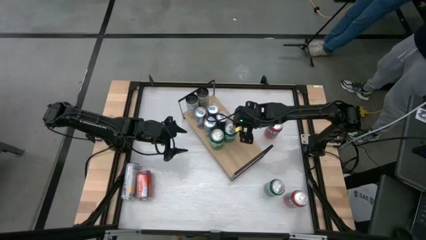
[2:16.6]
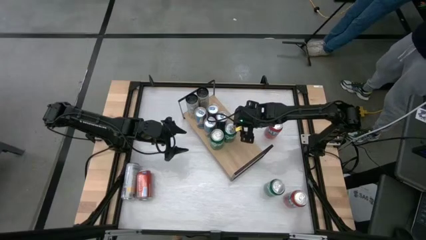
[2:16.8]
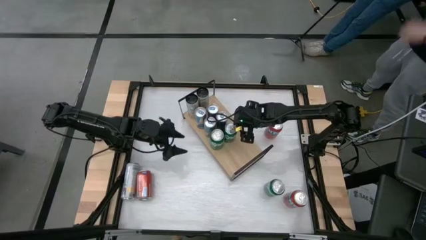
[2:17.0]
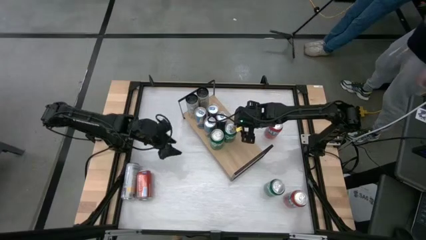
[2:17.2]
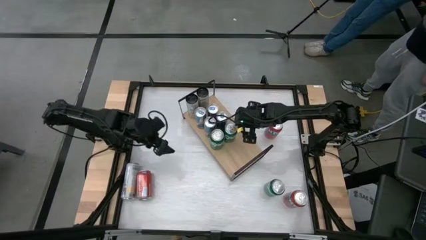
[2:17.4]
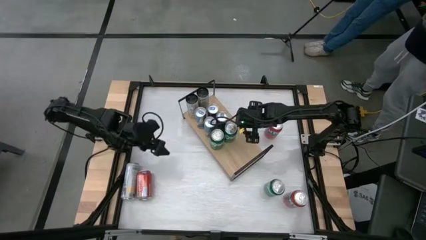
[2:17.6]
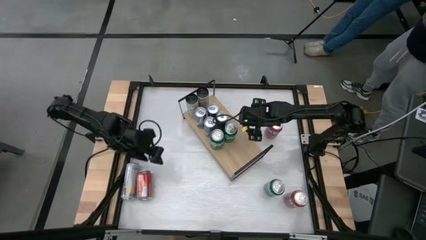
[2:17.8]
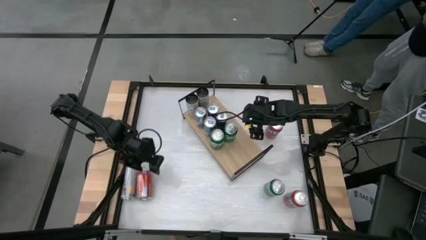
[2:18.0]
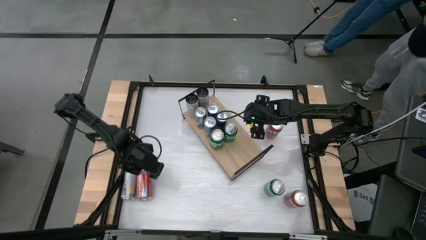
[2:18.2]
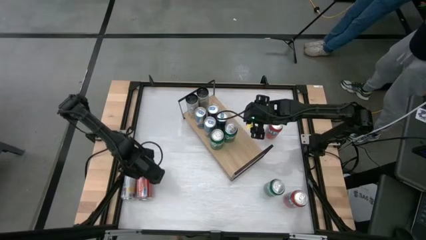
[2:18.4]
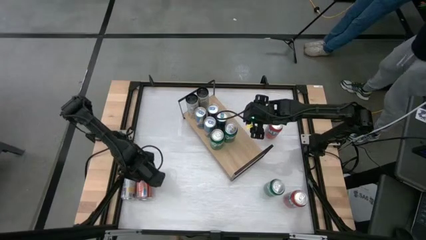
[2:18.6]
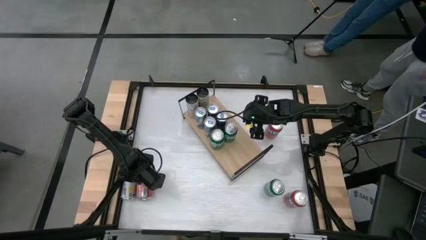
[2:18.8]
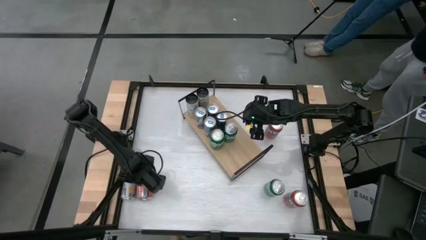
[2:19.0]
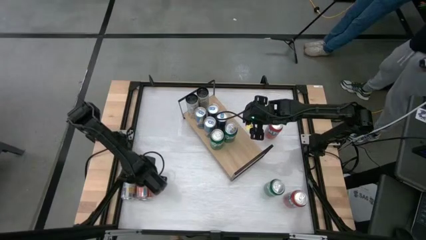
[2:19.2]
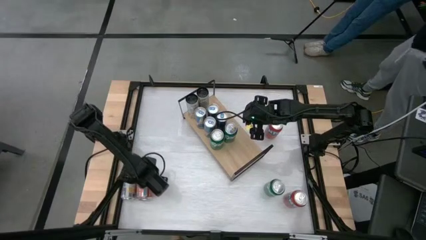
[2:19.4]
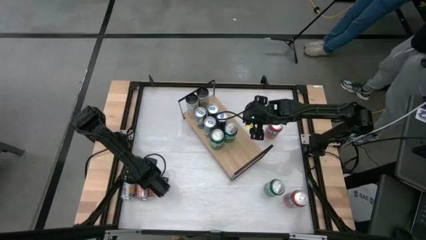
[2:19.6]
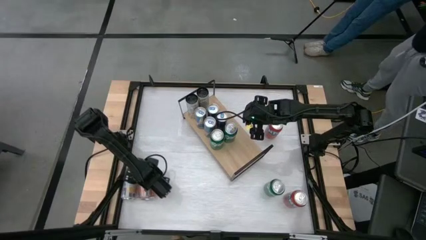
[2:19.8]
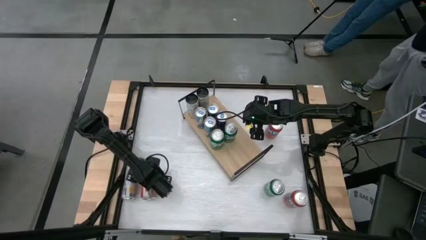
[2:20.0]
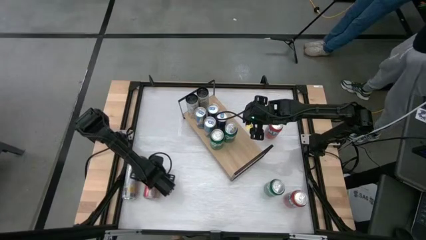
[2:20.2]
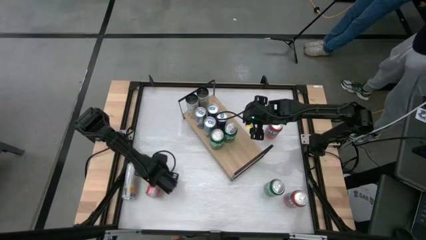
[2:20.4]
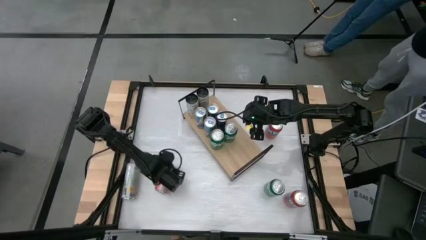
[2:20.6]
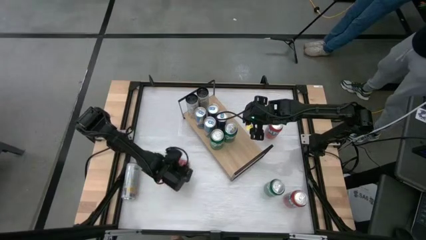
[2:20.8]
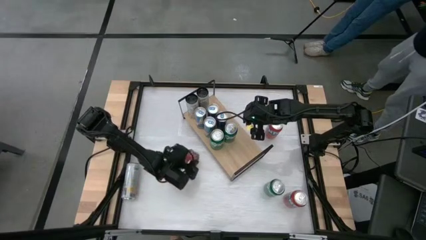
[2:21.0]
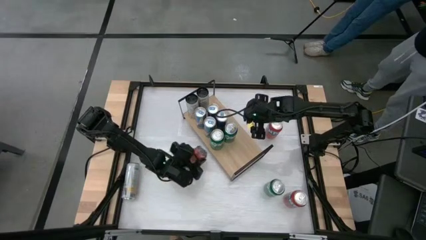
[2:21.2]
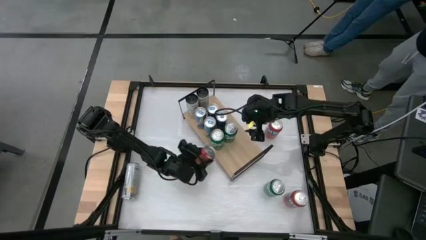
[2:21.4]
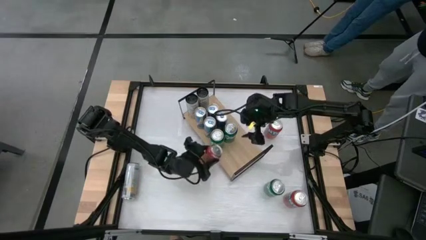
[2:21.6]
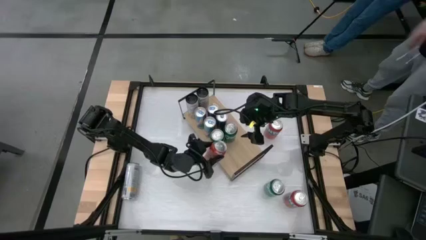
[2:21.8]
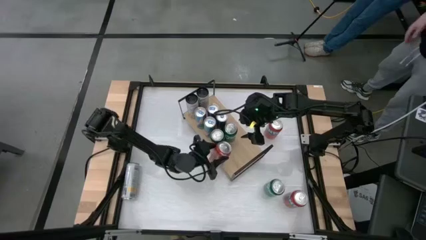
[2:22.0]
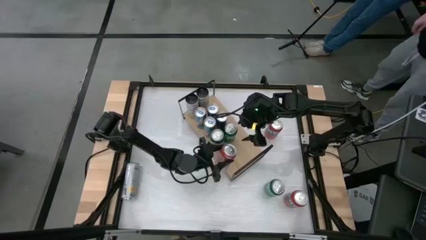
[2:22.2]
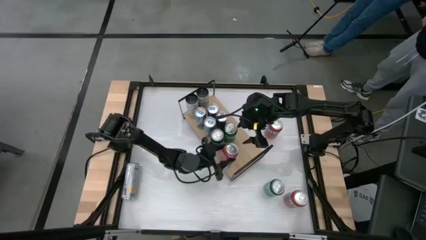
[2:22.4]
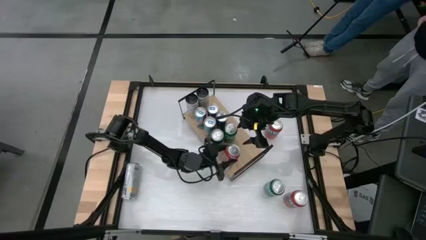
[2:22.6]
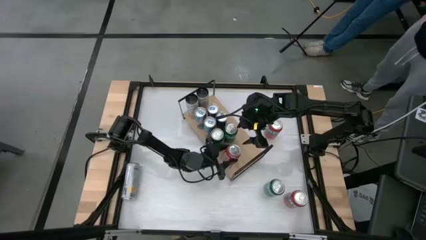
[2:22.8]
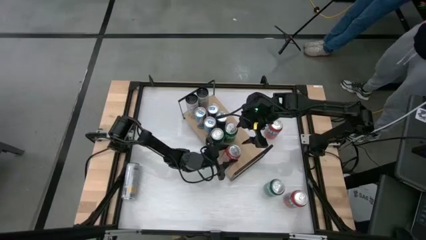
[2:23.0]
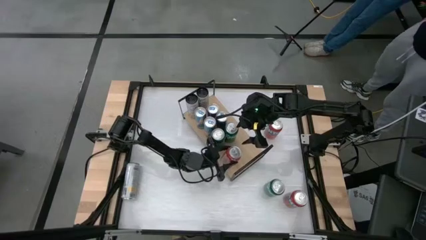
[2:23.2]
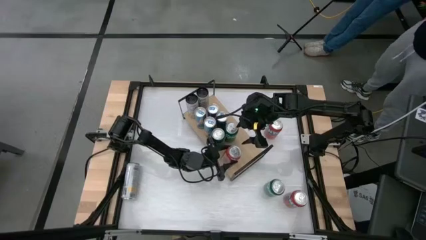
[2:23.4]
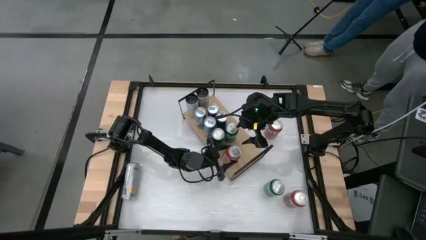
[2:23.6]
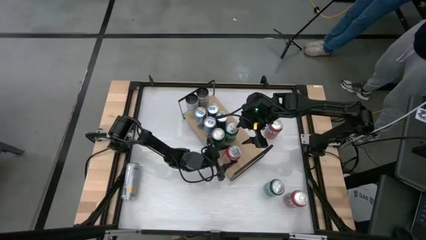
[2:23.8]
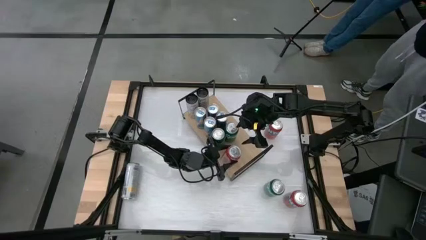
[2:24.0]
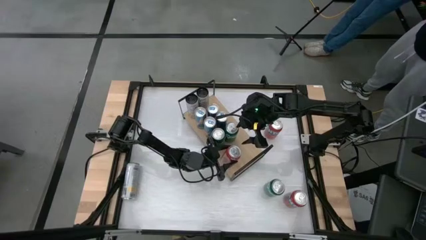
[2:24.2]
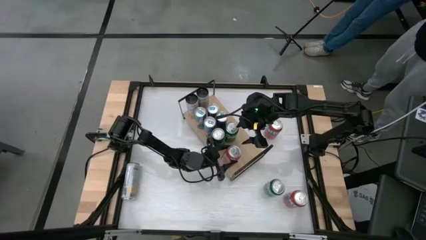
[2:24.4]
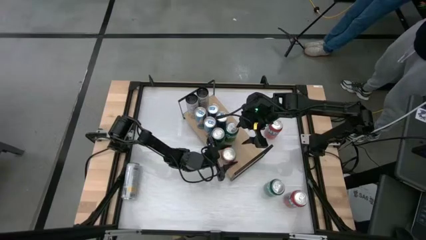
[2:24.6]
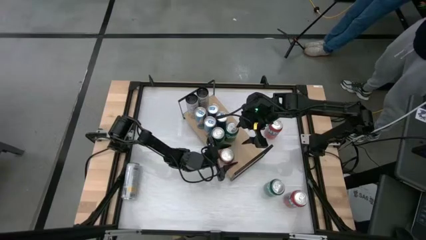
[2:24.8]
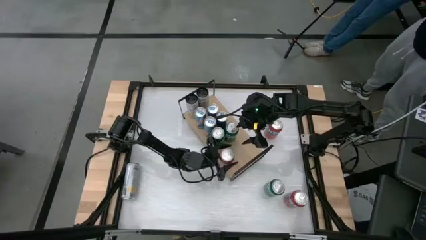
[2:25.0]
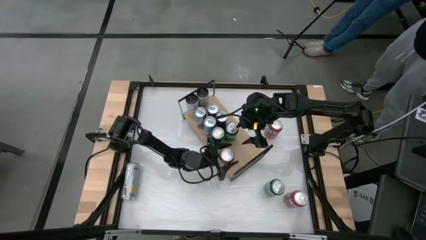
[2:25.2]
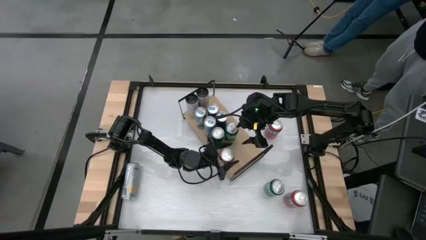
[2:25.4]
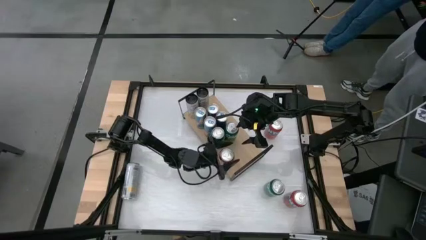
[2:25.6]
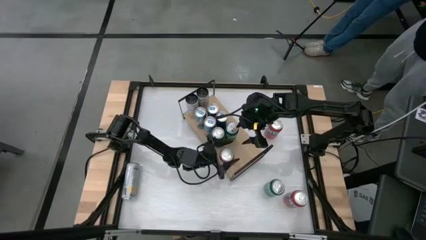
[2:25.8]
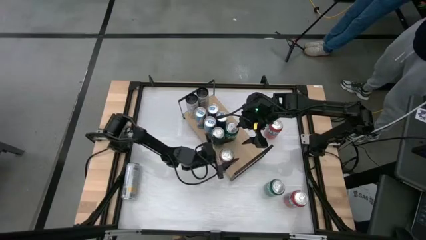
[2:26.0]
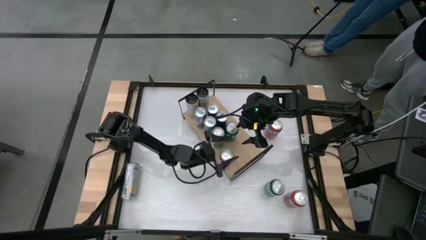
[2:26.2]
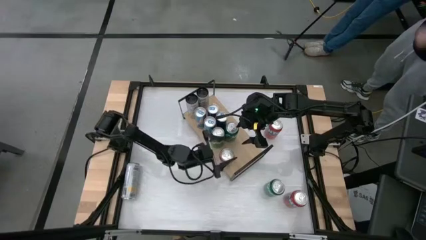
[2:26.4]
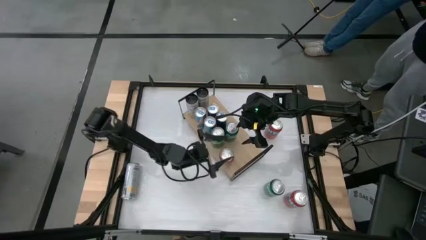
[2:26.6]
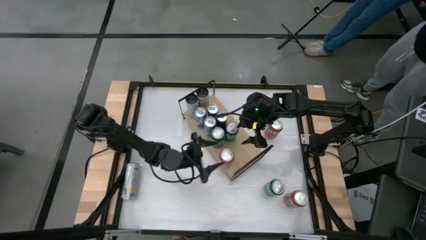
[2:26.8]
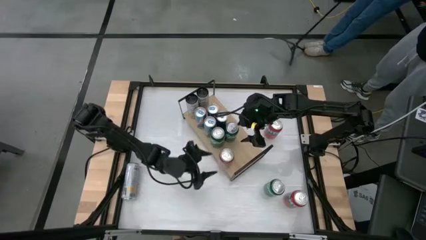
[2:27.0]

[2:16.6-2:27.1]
Task: Place canned beverage on shelf
Put the middle red soda can on the shelf

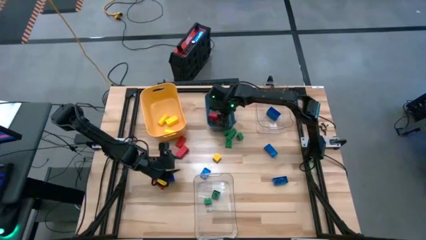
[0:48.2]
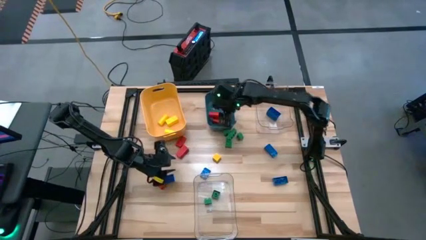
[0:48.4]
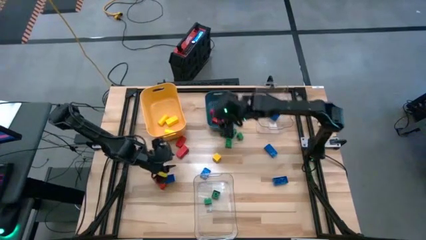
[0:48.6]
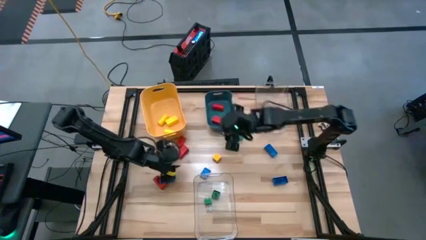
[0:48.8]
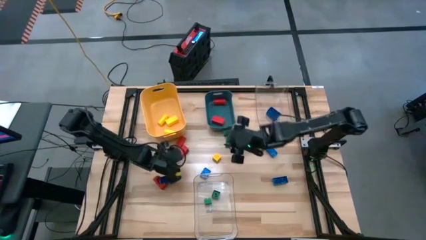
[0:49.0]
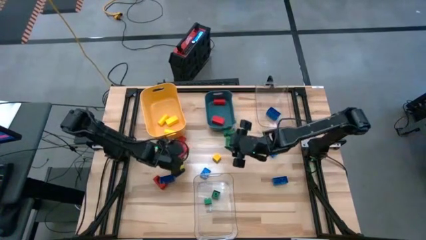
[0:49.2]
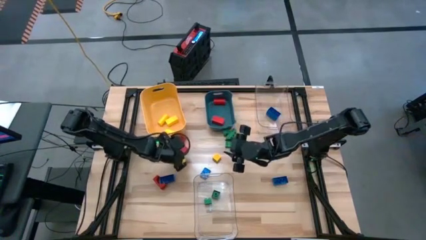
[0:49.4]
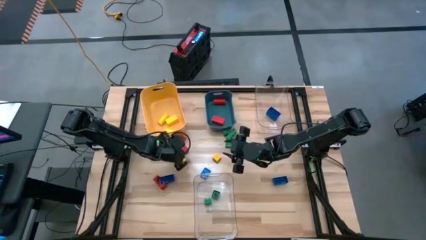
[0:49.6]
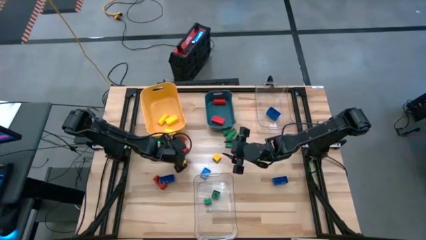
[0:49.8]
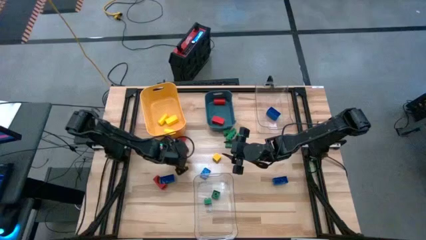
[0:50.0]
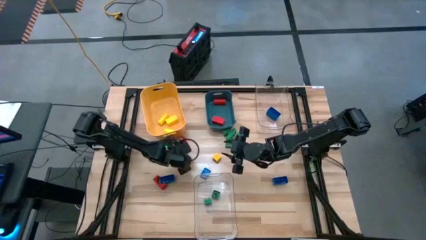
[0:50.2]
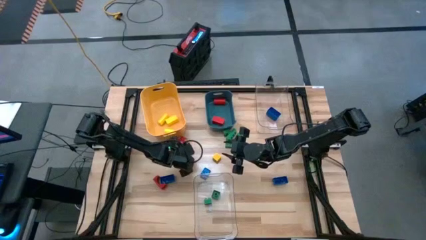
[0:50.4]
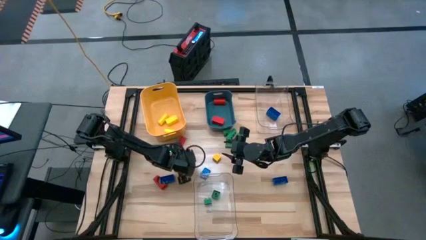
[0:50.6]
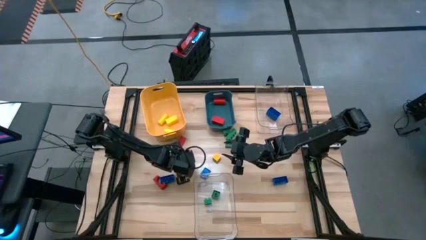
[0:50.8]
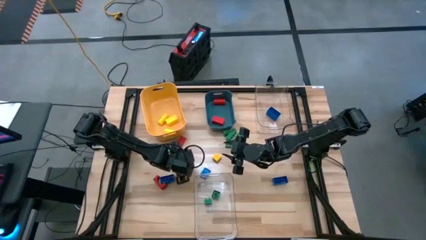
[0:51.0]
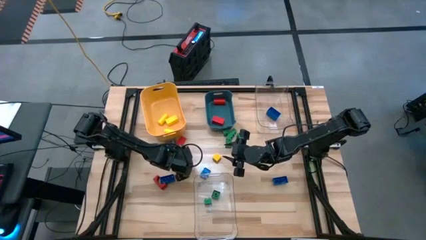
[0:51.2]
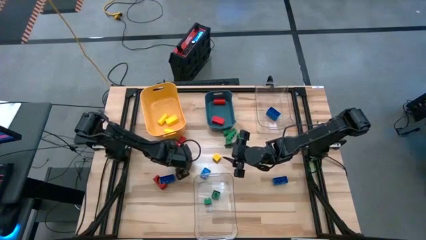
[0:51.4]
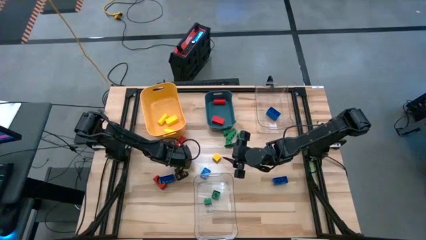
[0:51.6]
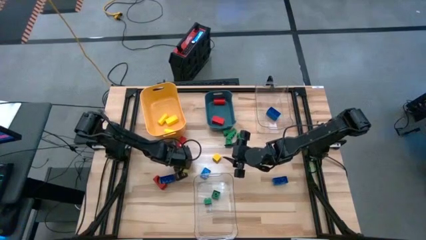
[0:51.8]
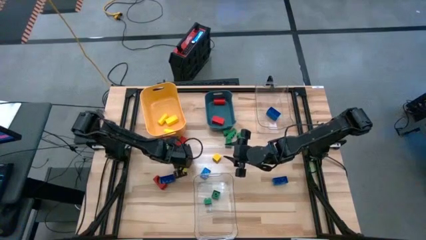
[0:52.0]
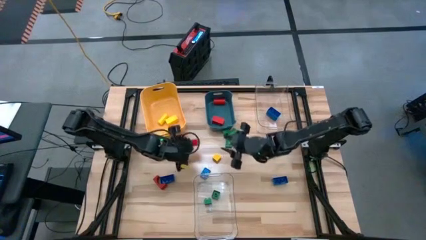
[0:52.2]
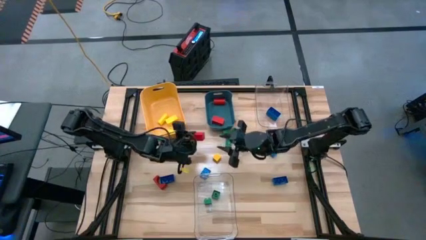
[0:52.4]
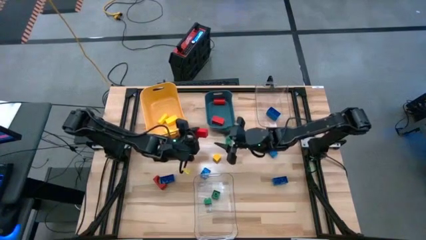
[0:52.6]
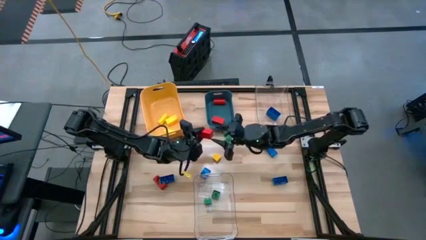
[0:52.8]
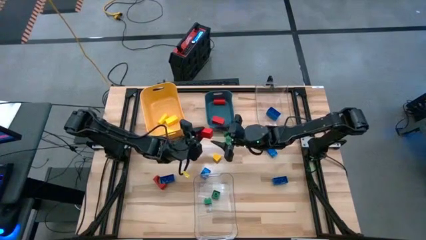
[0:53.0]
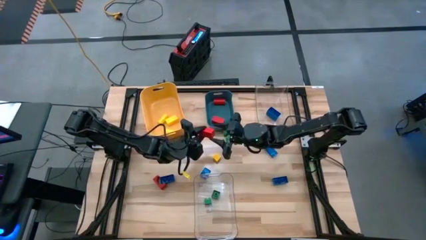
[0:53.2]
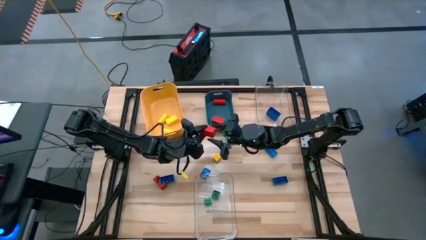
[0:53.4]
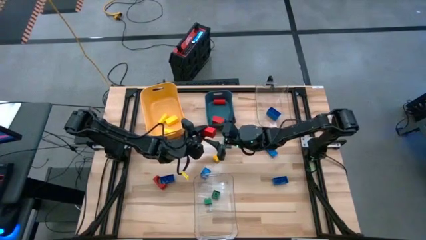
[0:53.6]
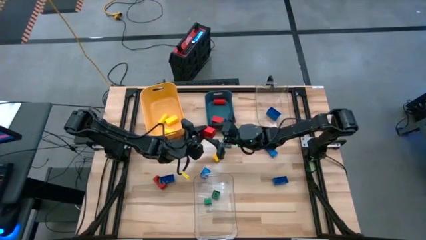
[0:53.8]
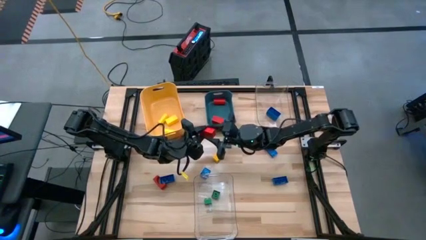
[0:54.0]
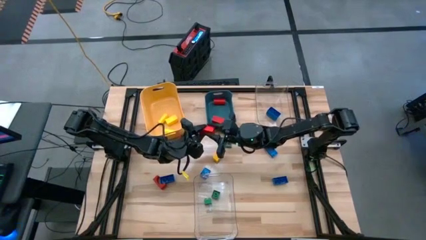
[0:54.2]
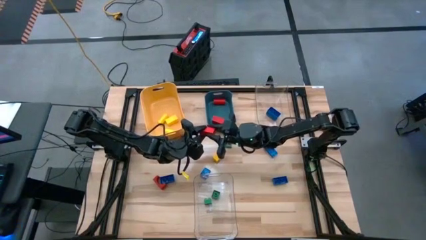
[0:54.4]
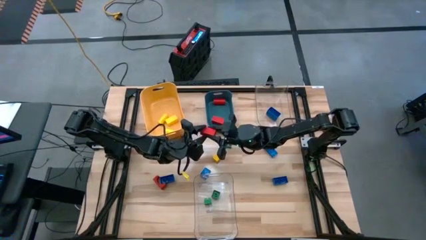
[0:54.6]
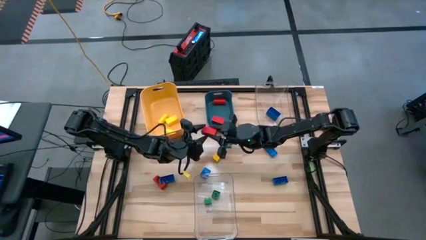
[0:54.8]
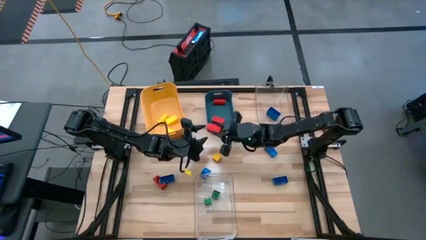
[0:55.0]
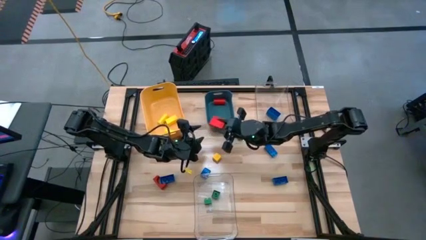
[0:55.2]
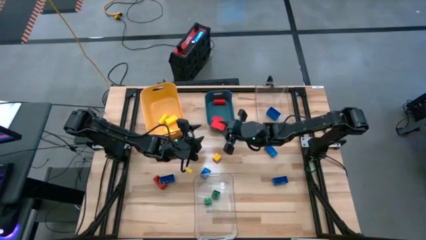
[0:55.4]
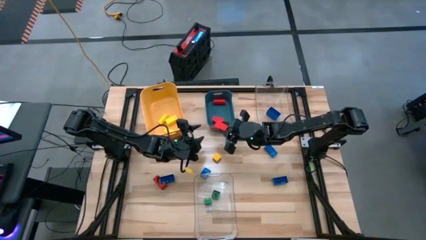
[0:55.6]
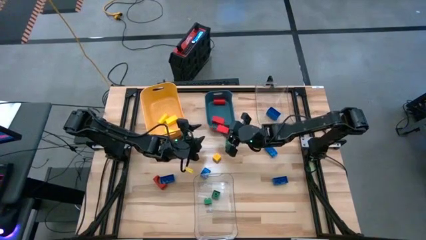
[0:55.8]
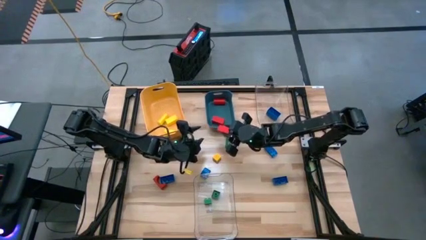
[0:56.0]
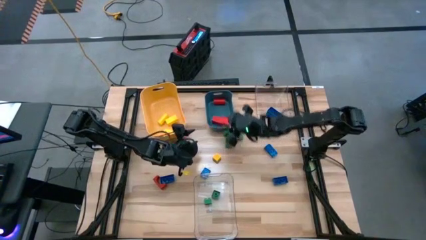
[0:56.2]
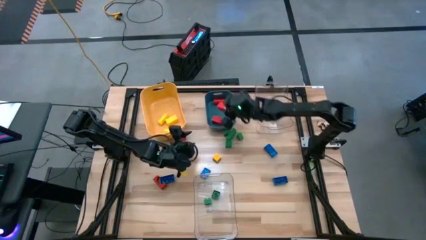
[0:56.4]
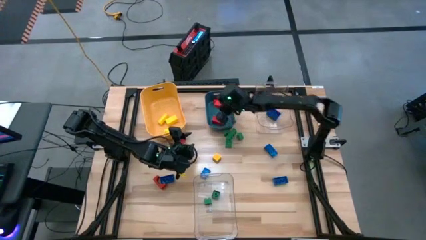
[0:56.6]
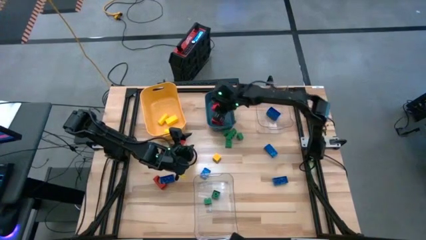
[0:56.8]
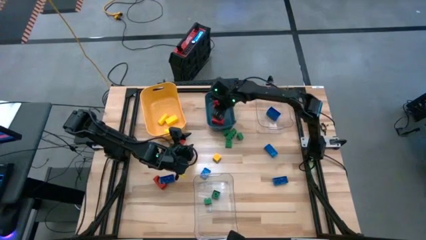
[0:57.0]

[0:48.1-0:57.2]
Task: Sort blocks
Put the red wooden block into the blue bin
